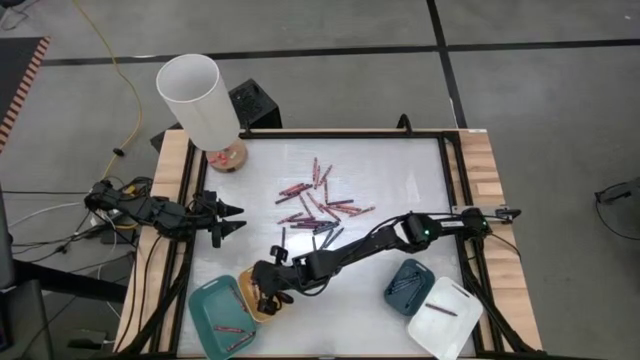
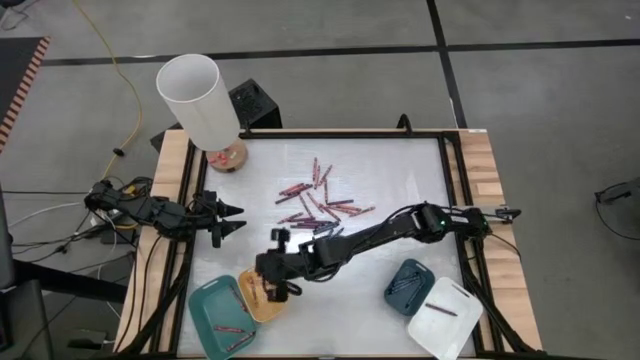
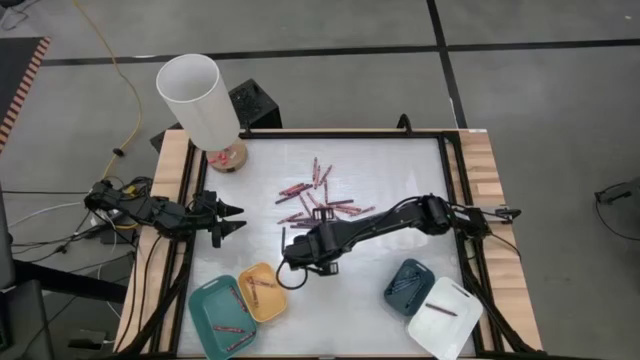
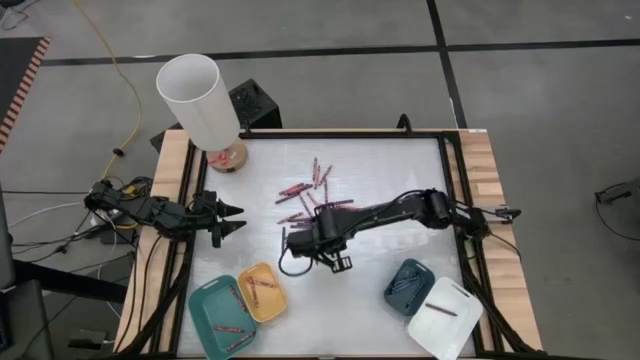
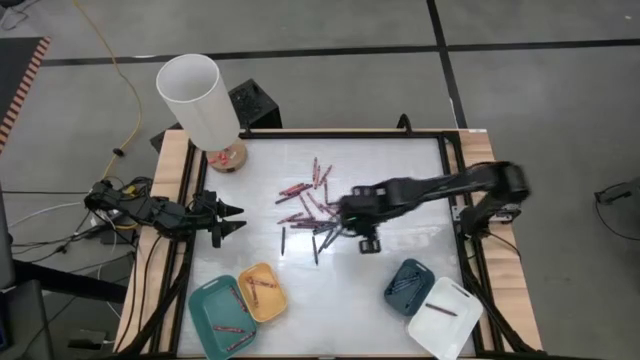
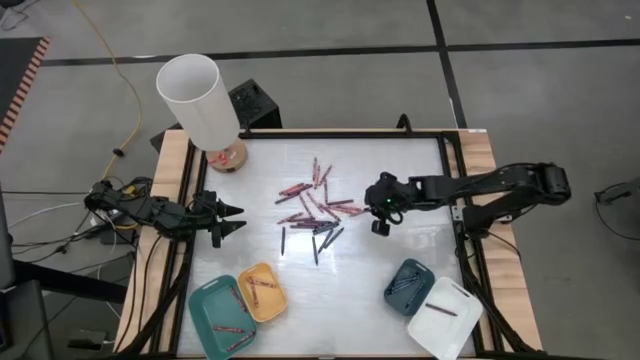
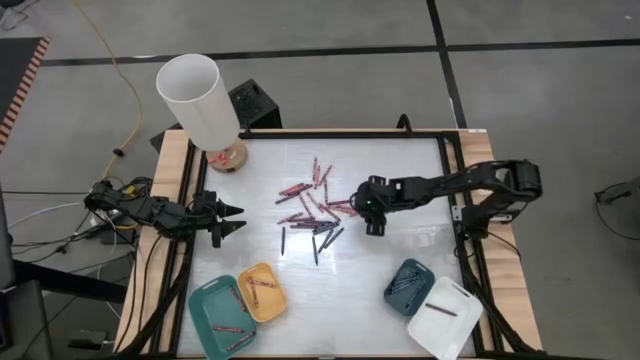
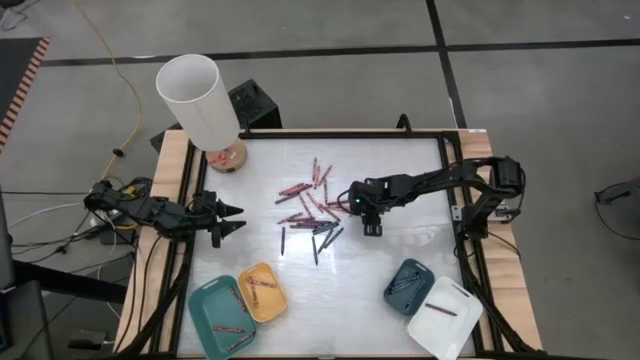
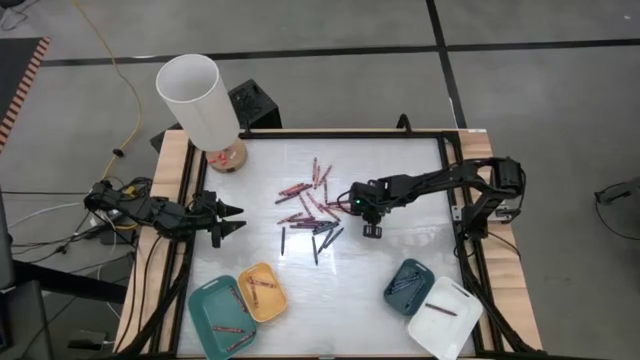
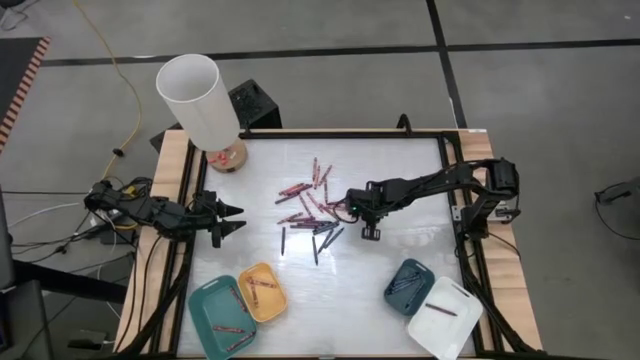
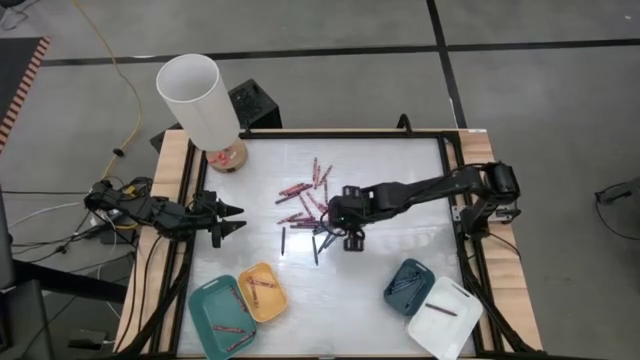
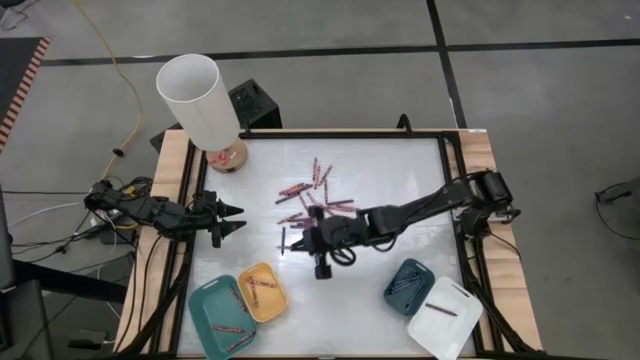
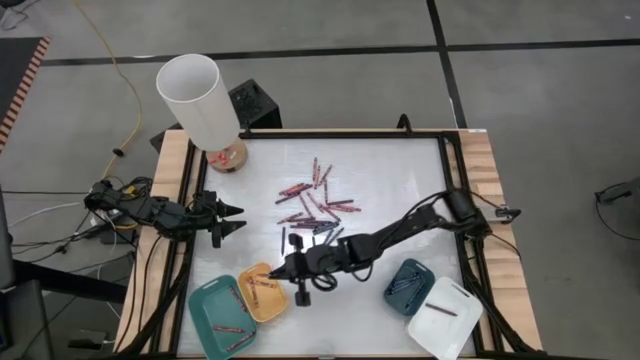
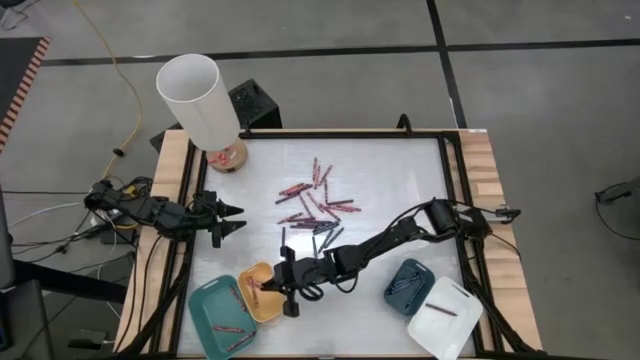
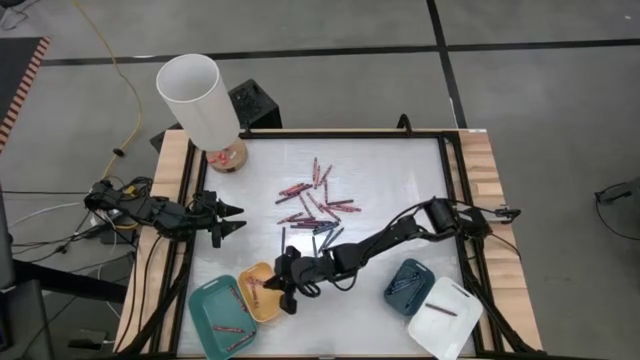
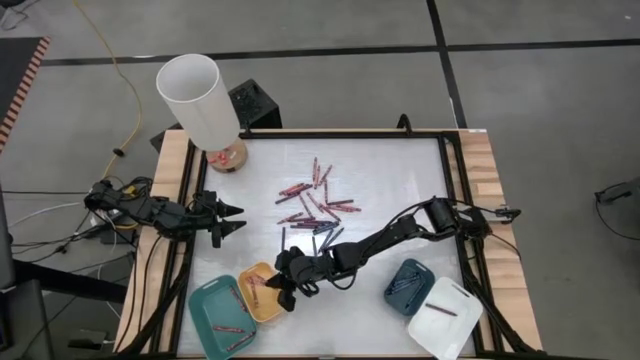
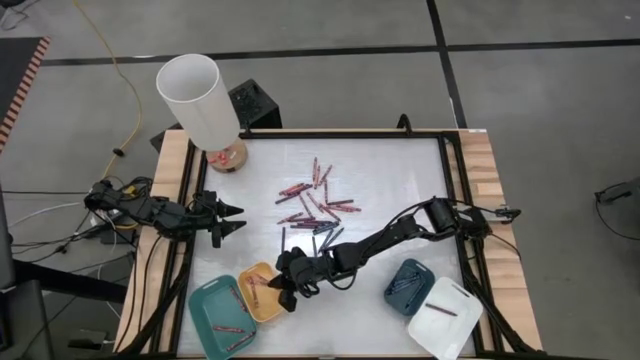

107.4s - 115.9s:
Task: Sort crayons
Put the pink crayon into the yellow bin

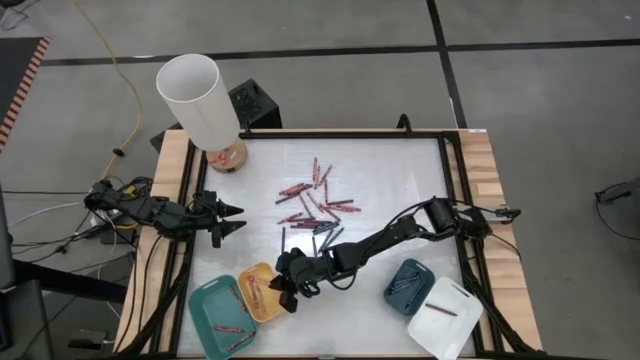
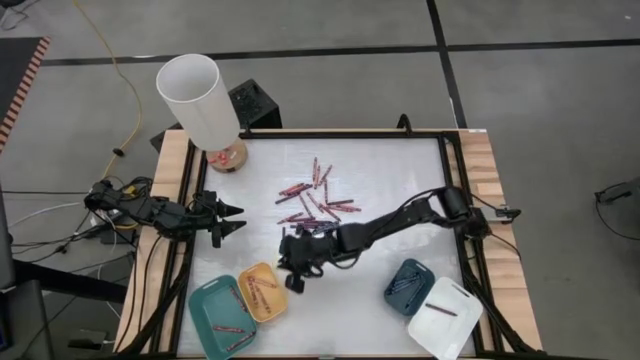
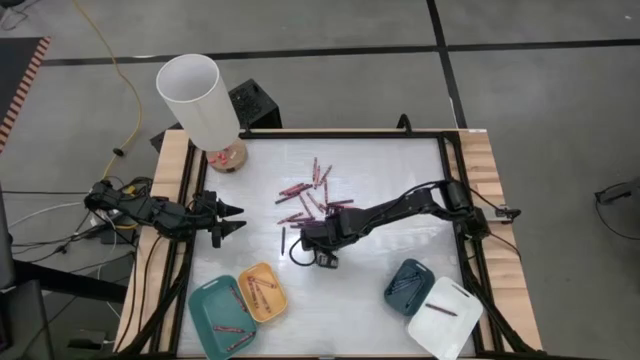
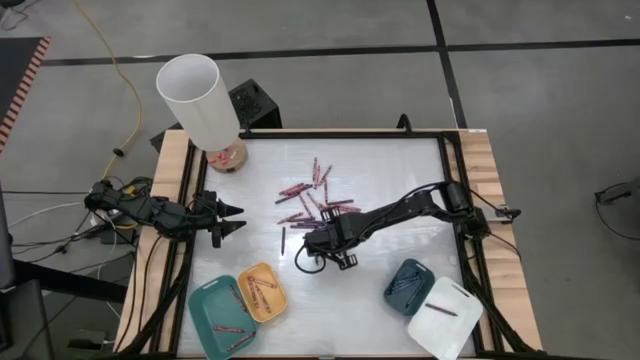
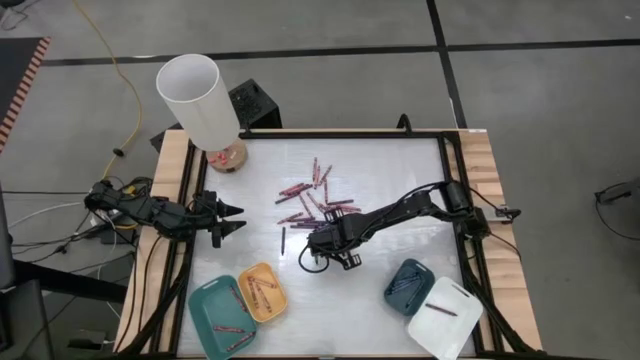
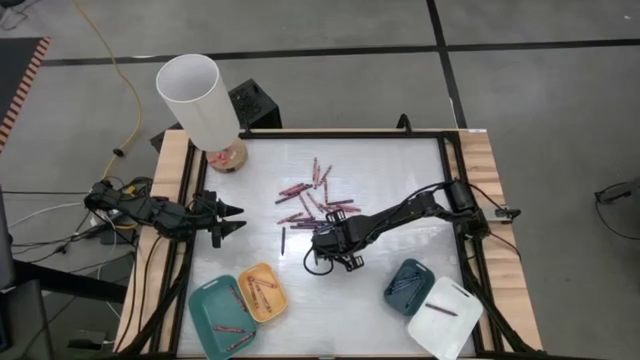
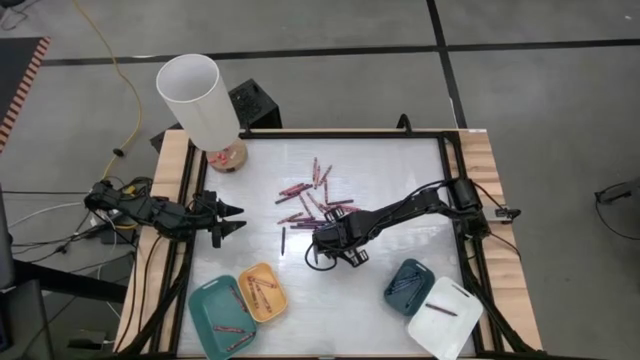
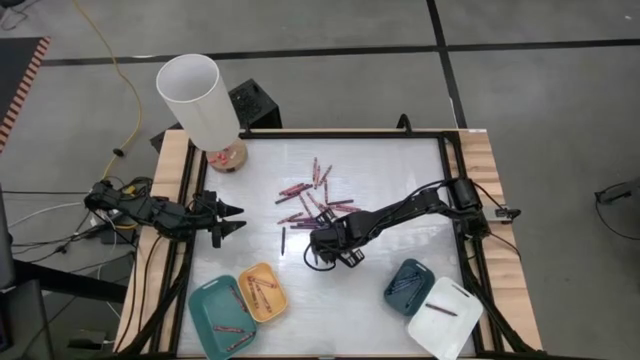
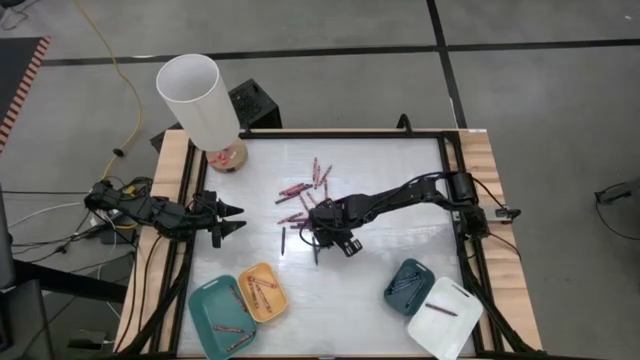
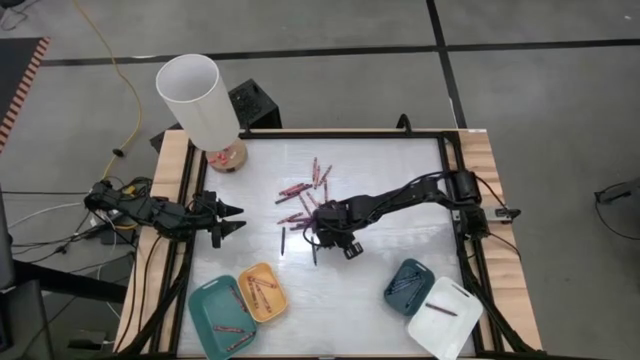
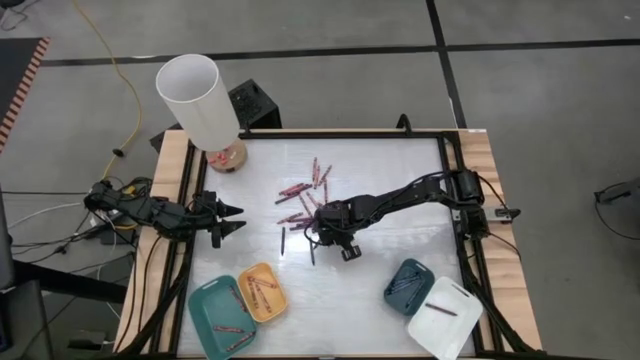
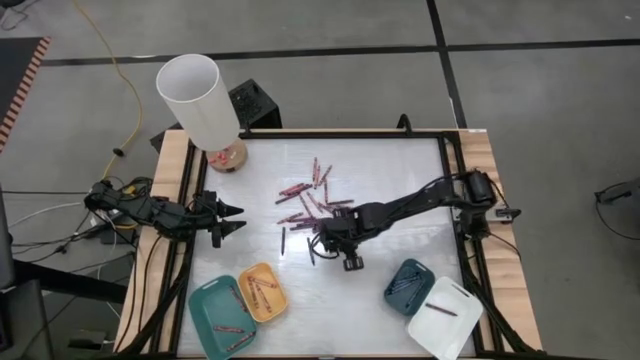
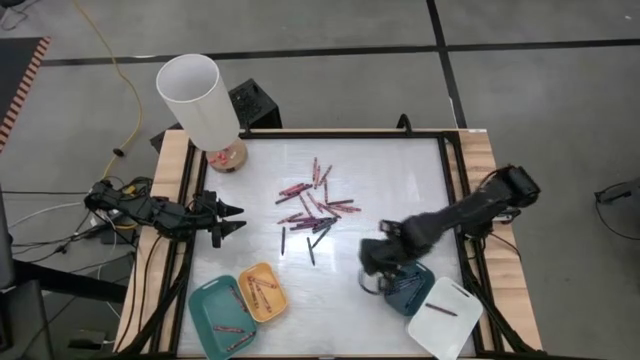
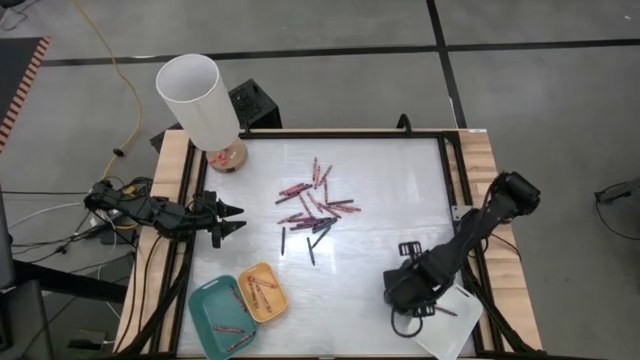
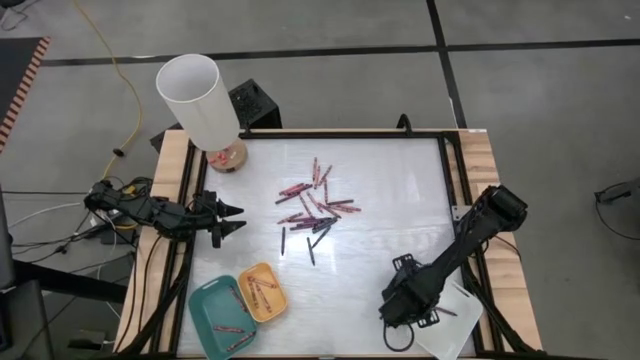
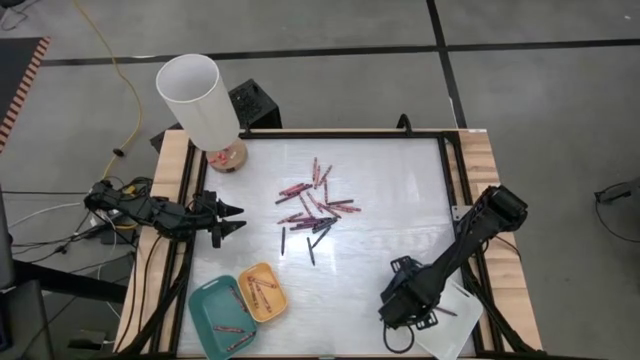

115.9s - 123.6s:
Put the blue crayon into the dark blue bin

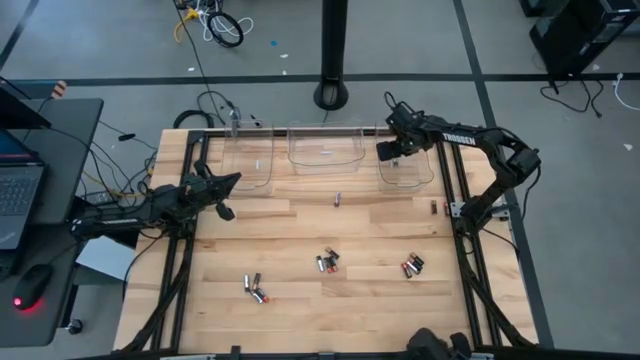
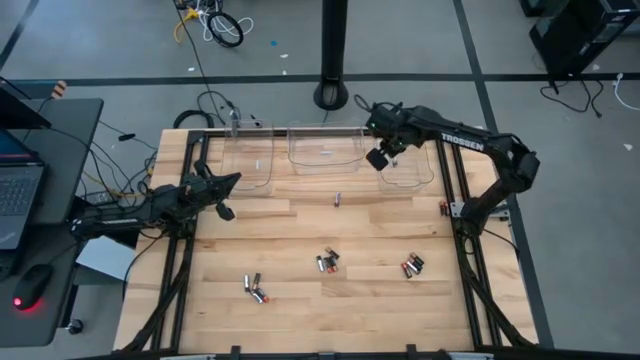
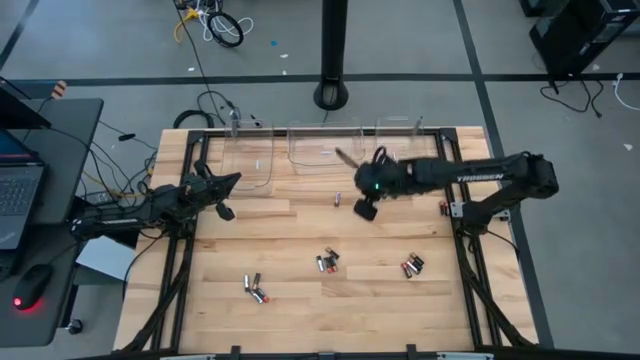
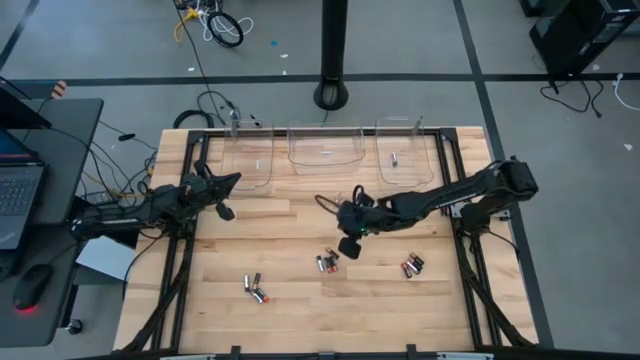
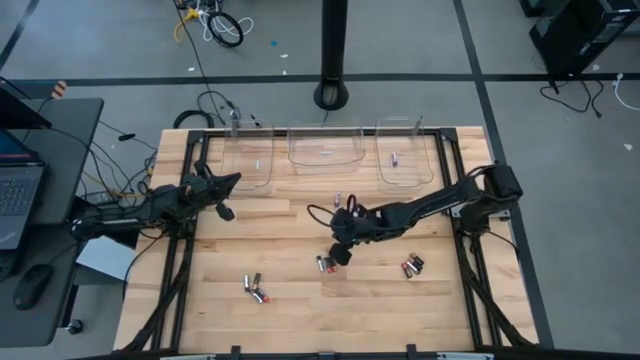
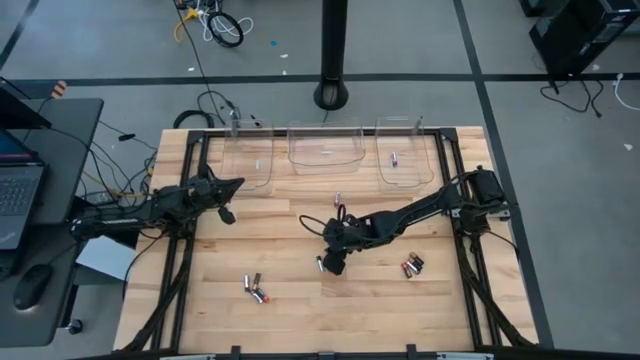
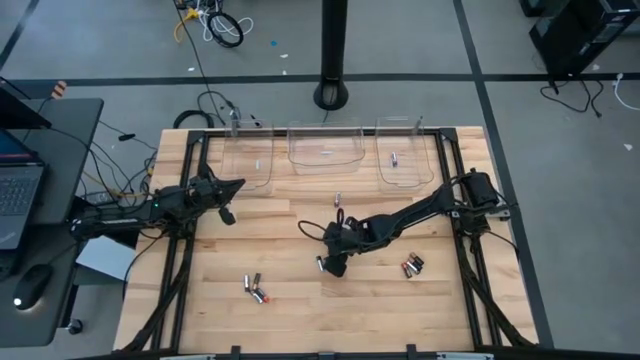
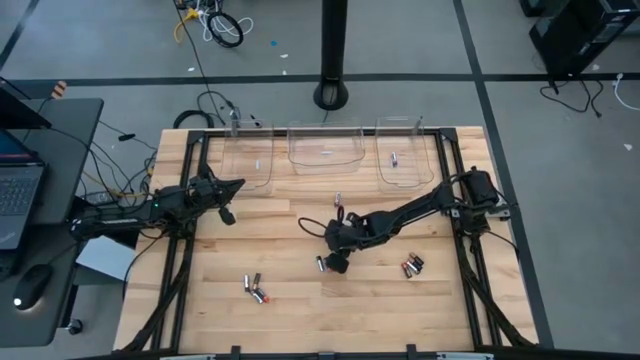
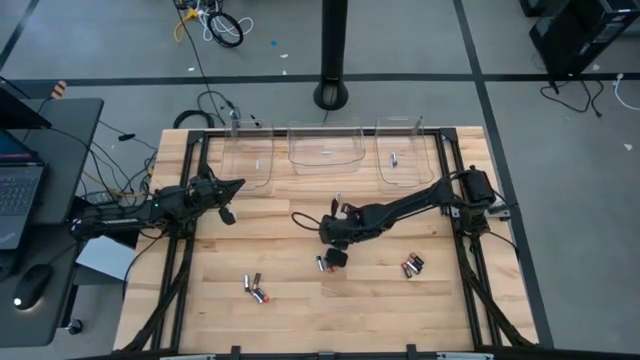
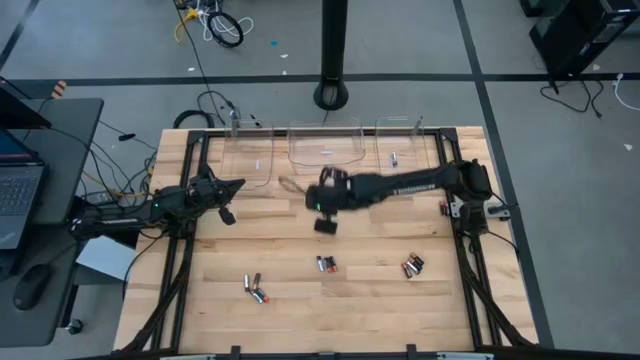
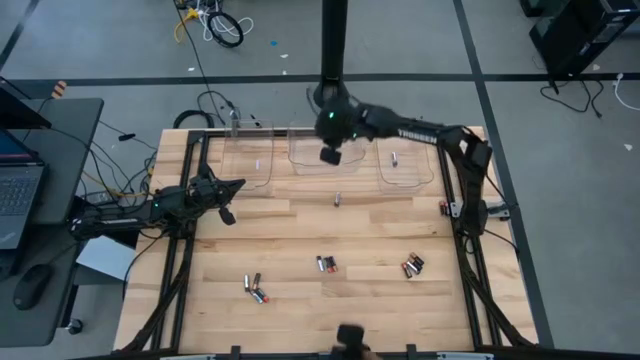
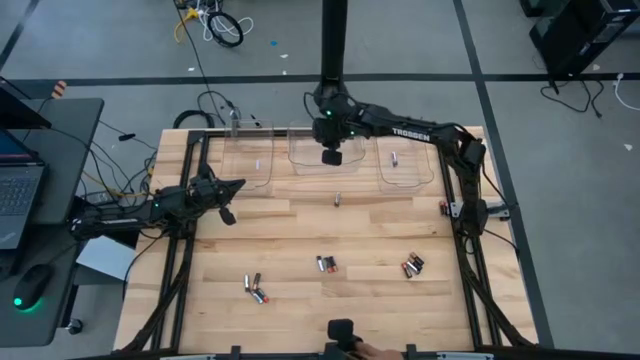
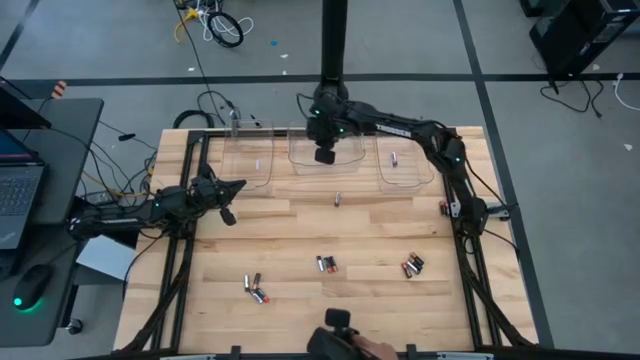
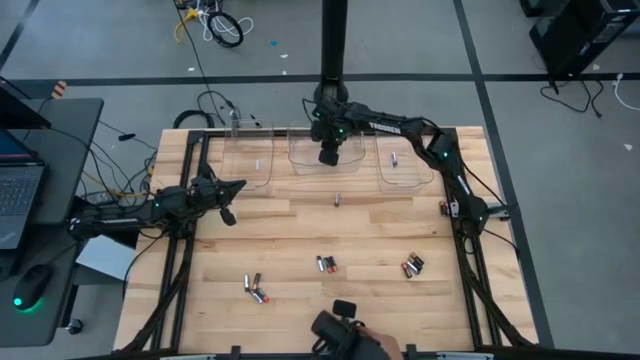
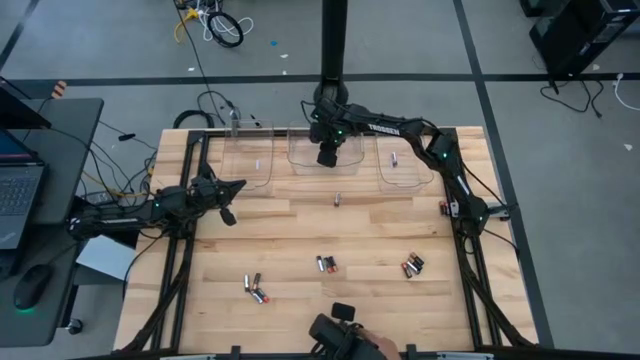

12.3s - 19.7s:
Task: Sort batteries
Put the black battery into the middle transparent bin
